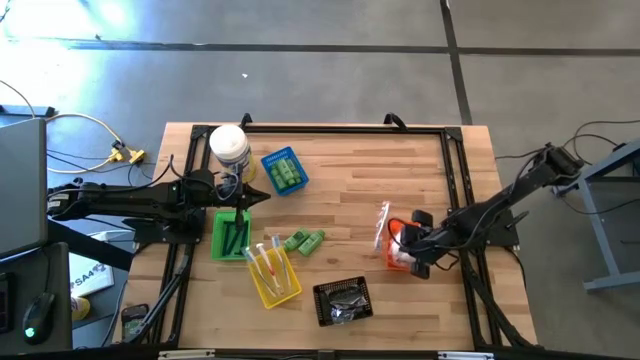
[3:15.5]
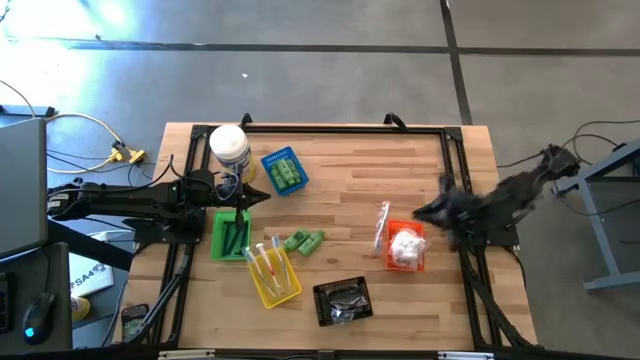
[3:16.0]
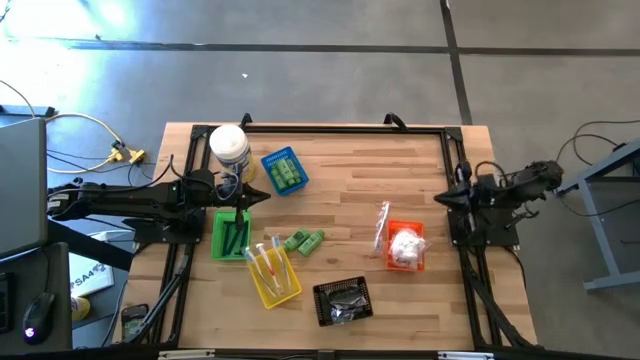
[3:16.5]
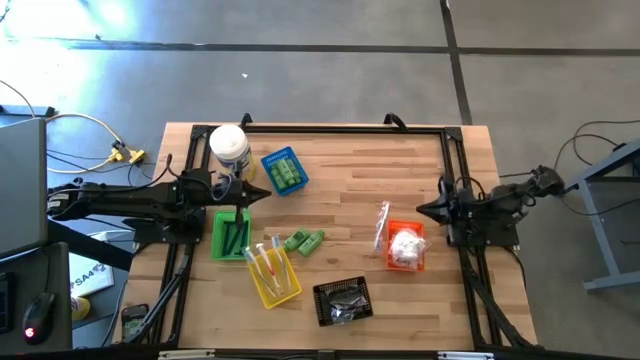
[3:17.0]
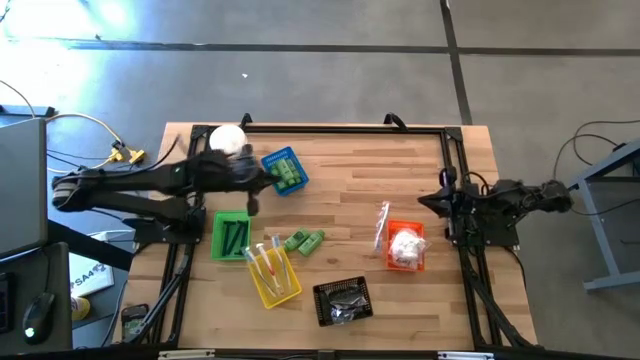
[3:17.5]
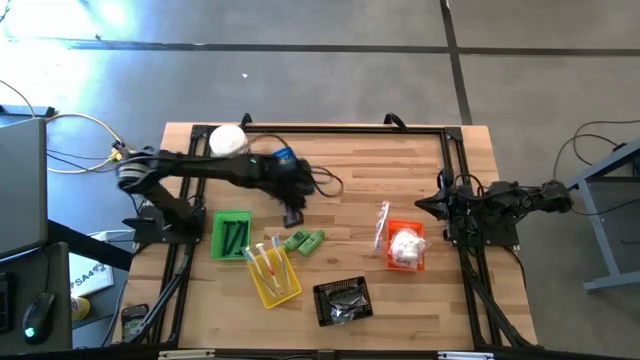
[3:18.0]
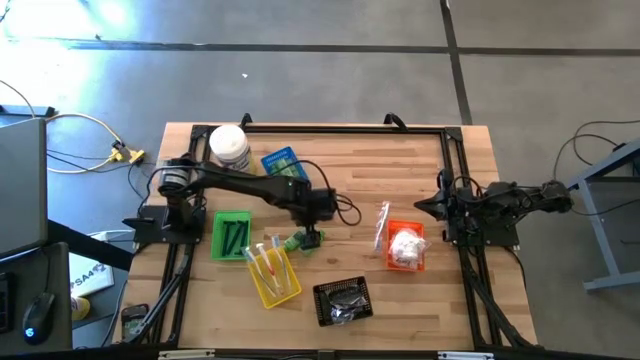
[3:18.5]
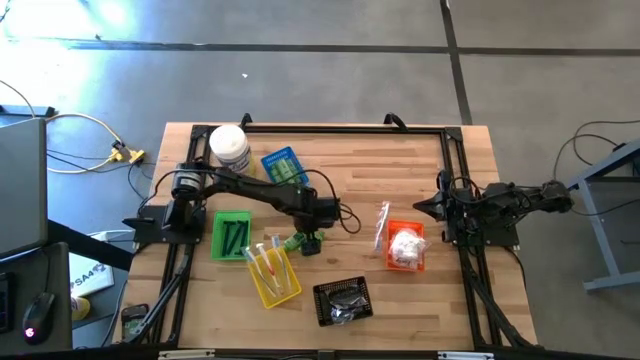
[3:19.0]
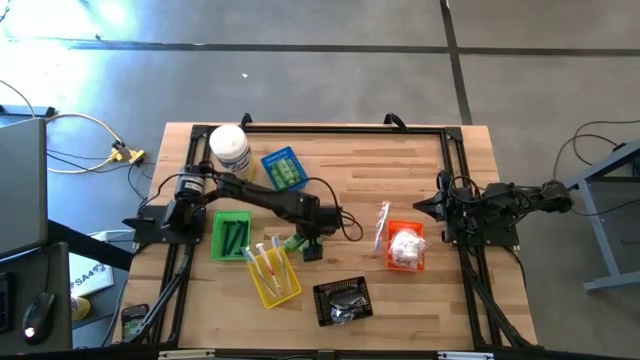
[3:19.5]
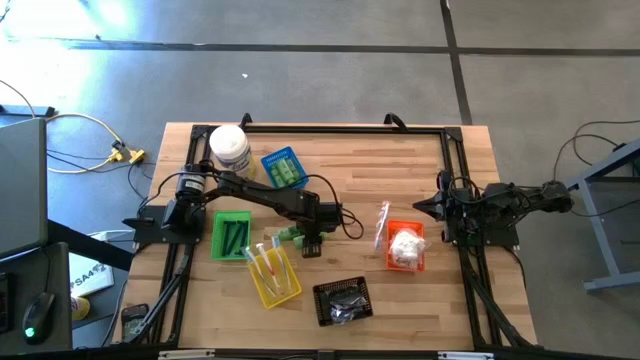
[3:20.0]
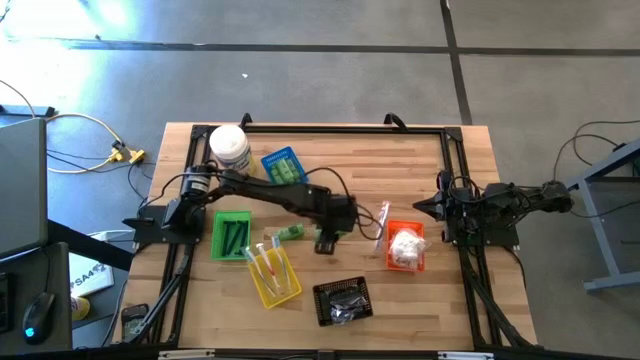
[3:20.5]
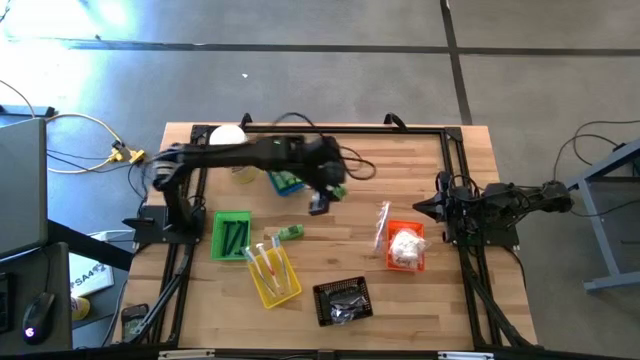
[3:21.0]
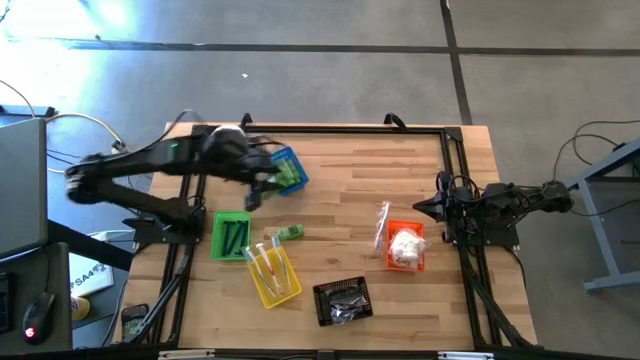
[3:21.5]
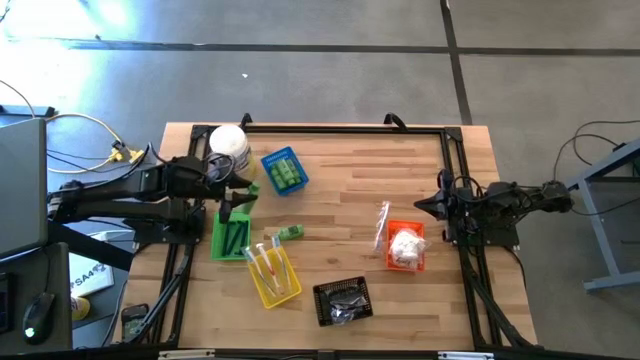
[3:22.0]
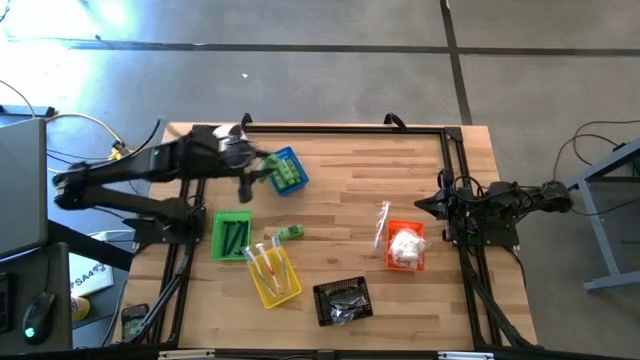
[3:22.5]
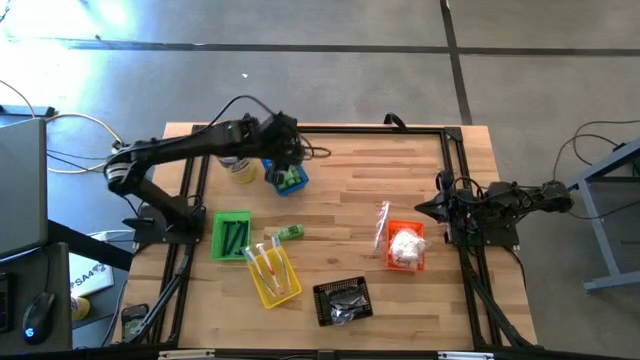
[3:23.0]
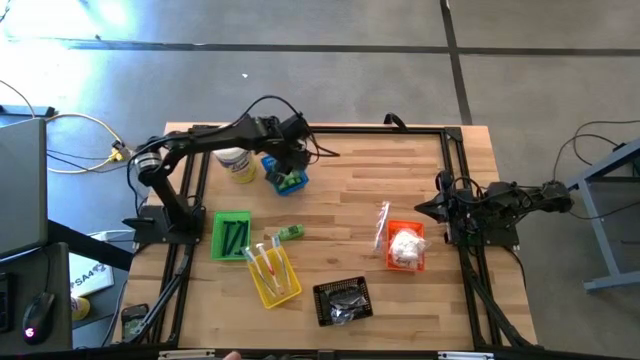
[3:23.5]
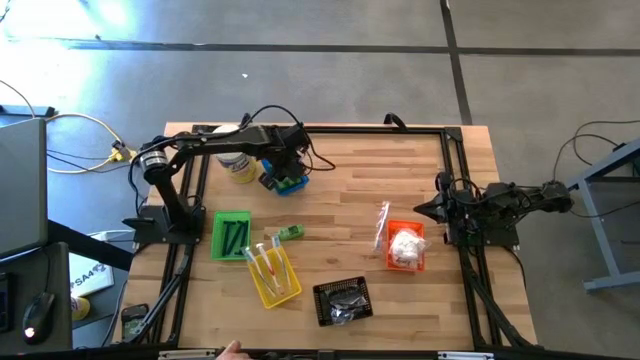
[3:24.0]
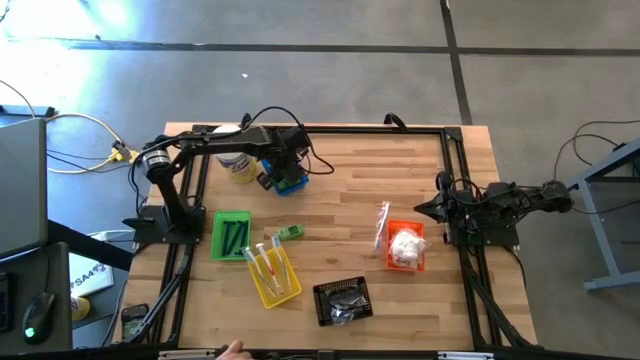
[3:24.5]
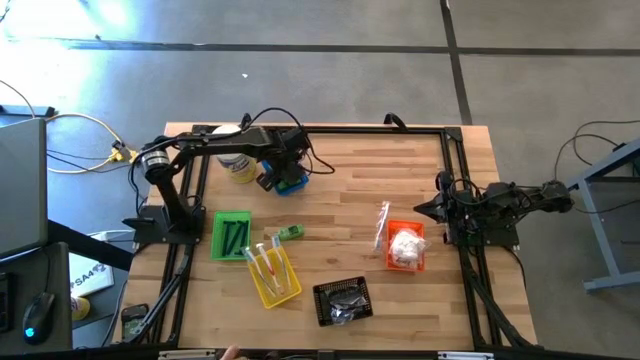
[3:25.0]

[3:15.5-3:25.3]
Task: Pick & Place Travel size toiletries
Put the green shampoo into the blue bin

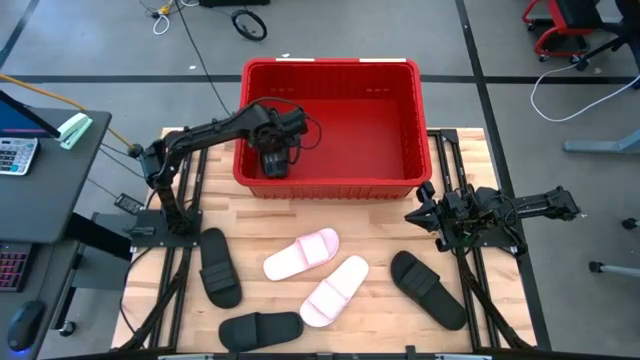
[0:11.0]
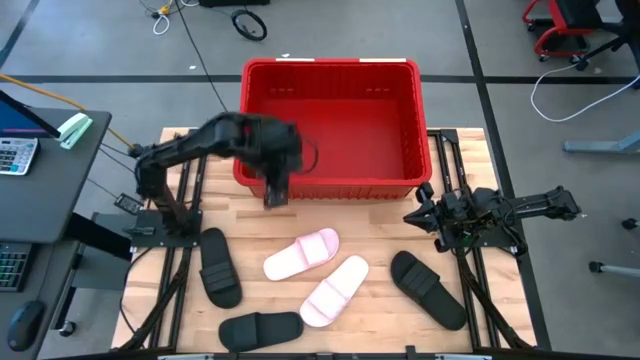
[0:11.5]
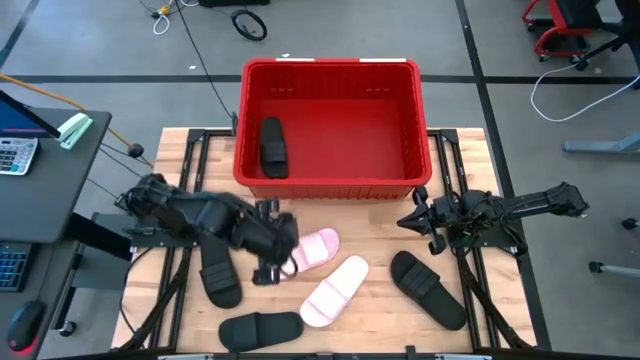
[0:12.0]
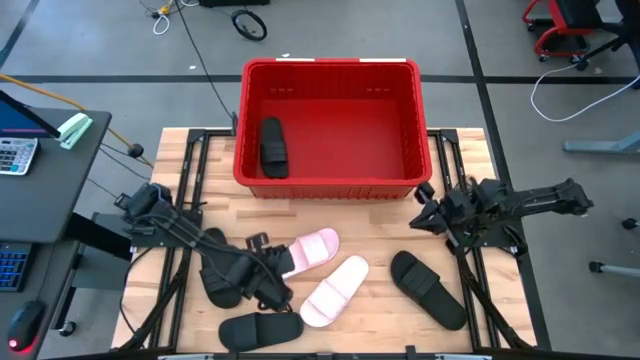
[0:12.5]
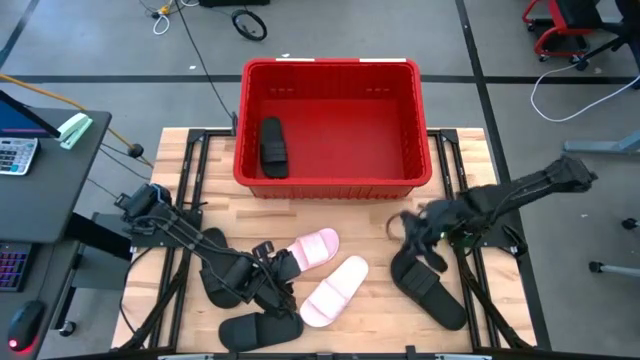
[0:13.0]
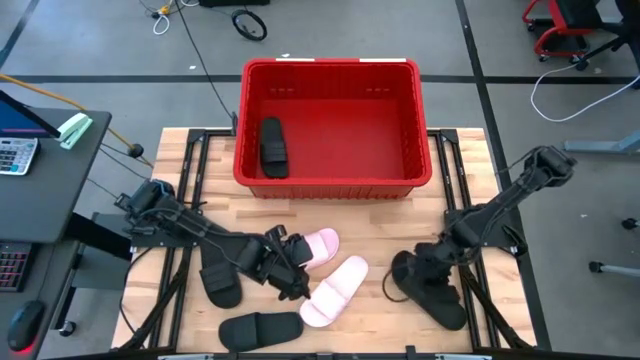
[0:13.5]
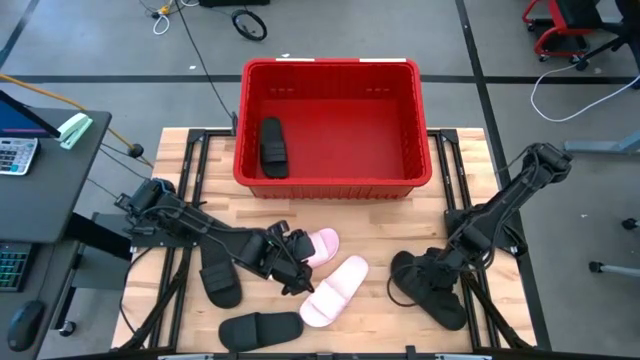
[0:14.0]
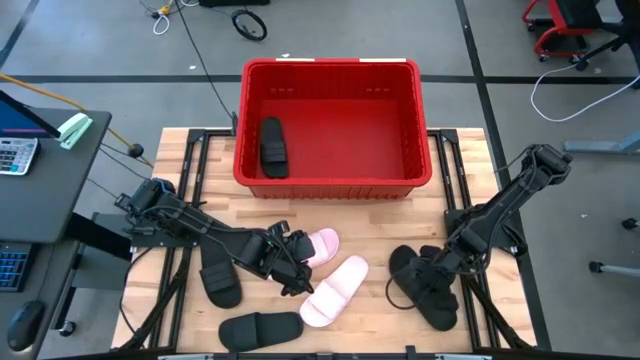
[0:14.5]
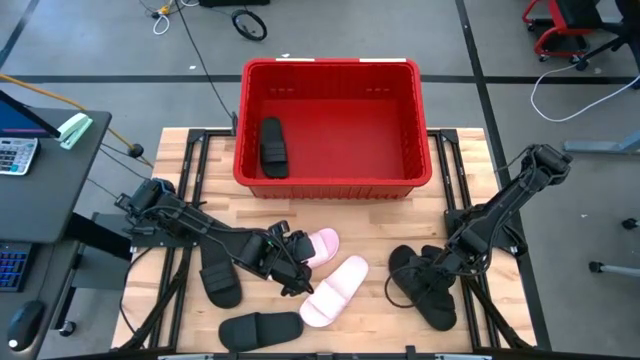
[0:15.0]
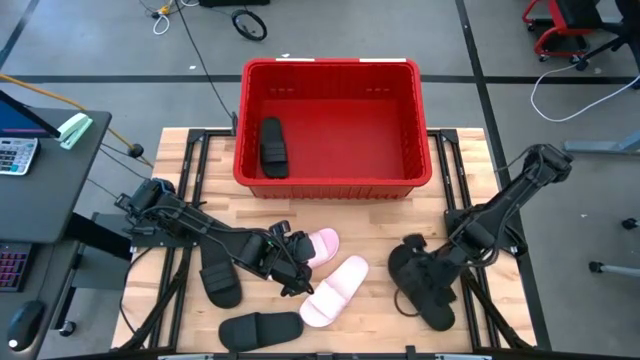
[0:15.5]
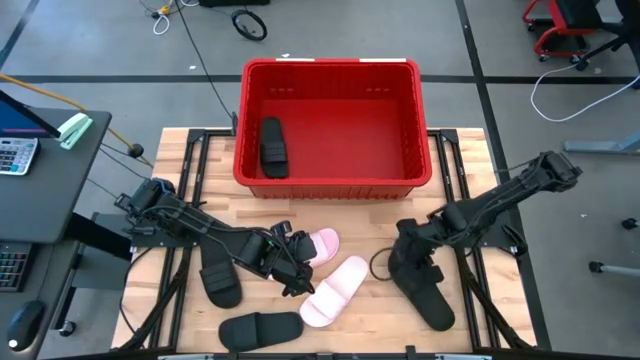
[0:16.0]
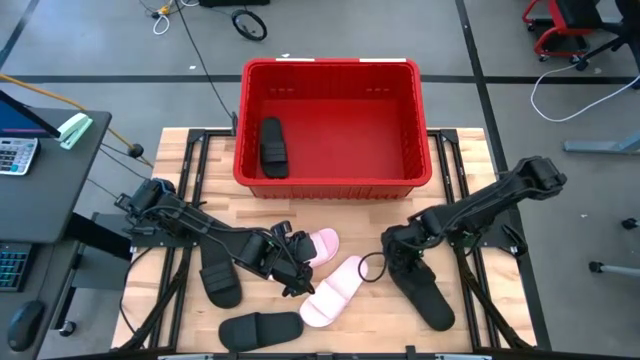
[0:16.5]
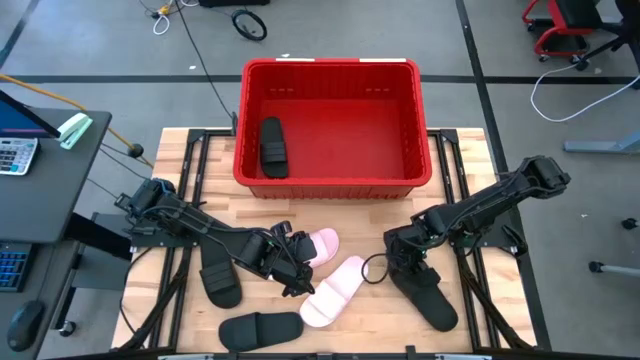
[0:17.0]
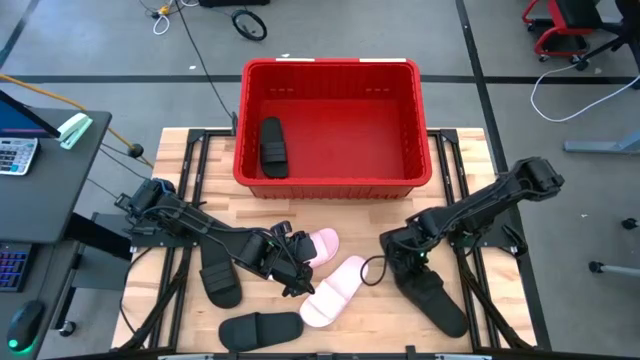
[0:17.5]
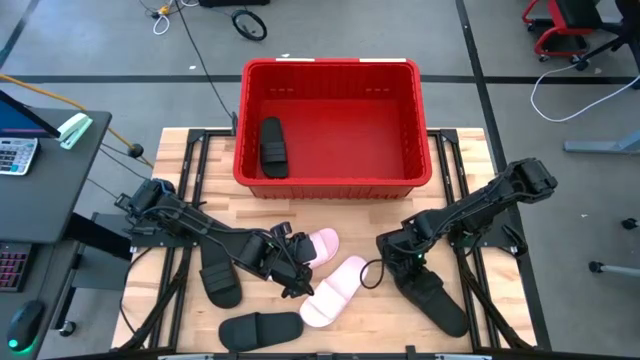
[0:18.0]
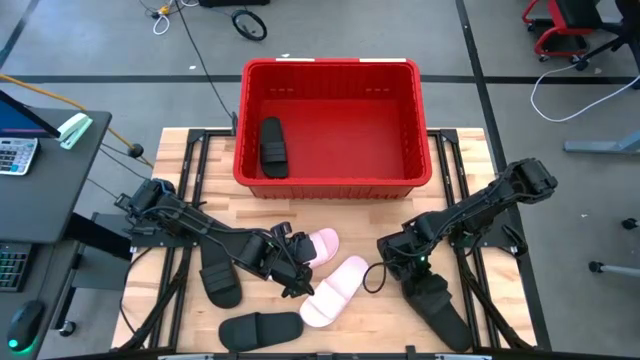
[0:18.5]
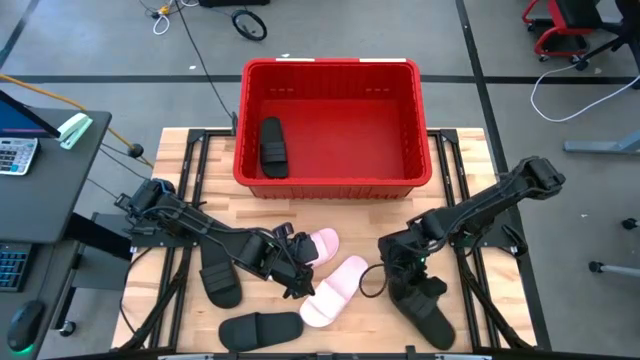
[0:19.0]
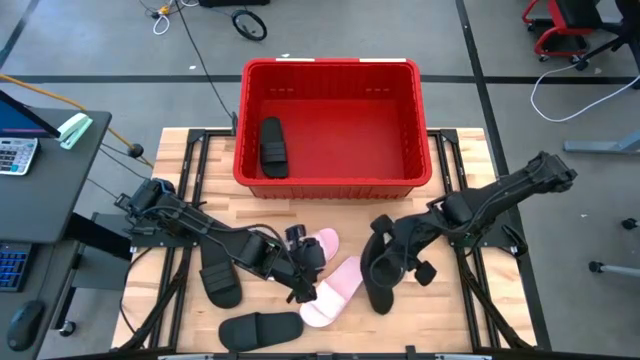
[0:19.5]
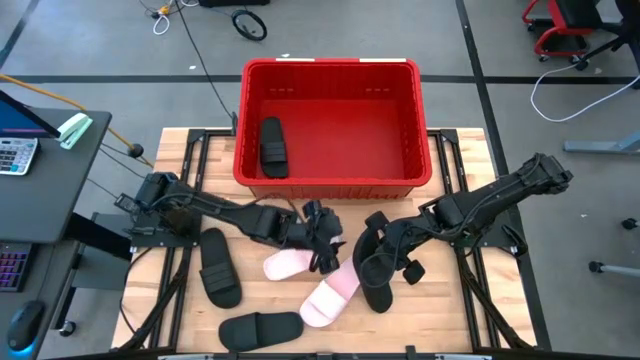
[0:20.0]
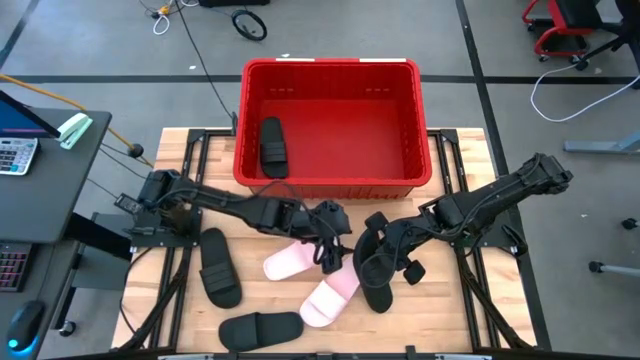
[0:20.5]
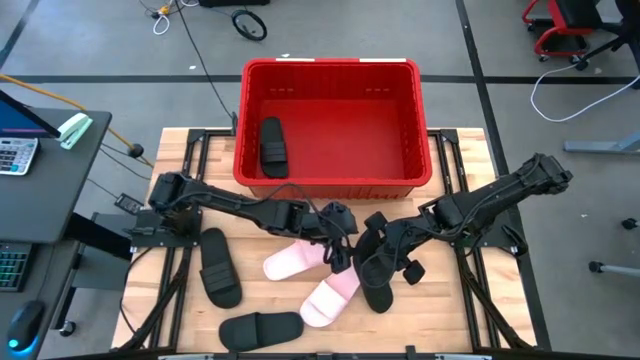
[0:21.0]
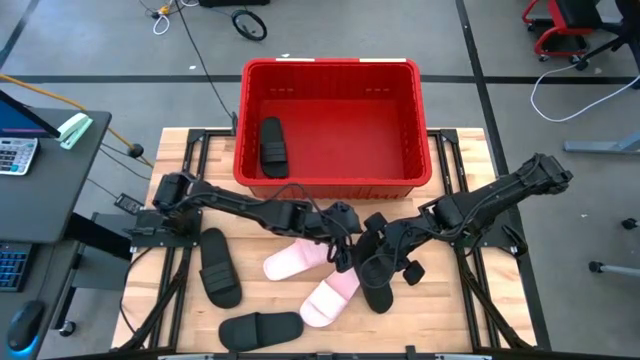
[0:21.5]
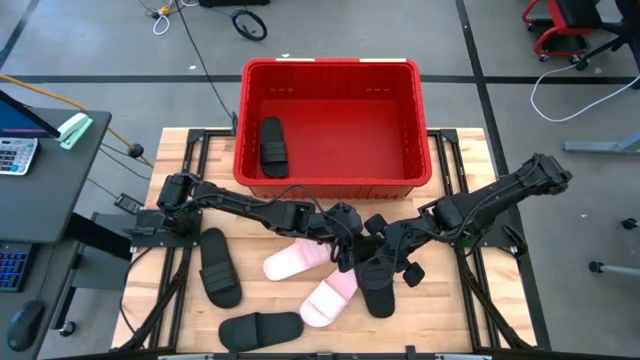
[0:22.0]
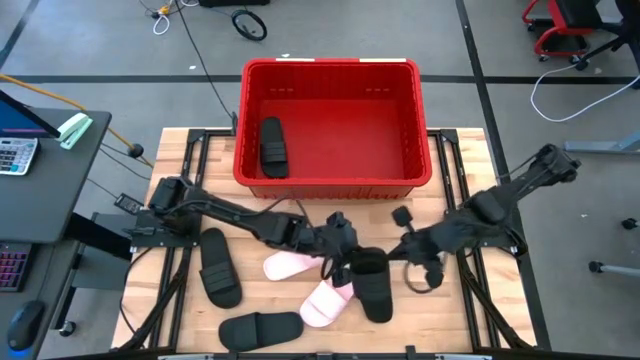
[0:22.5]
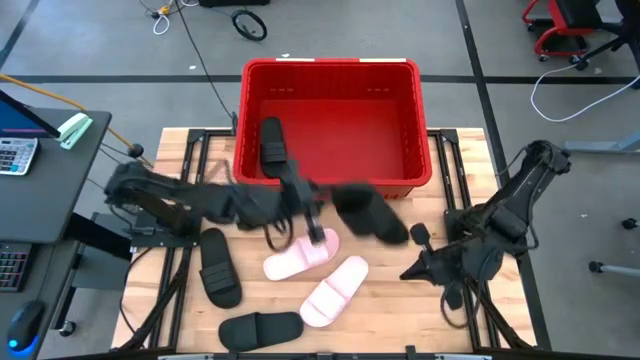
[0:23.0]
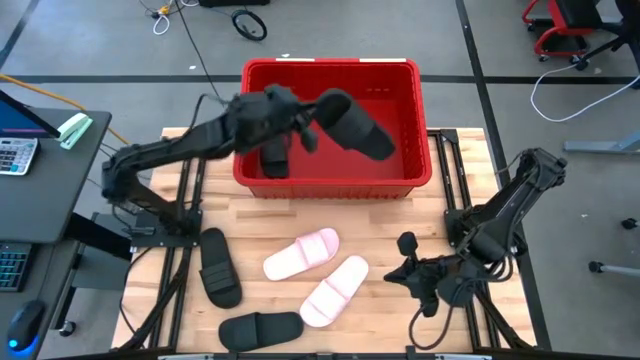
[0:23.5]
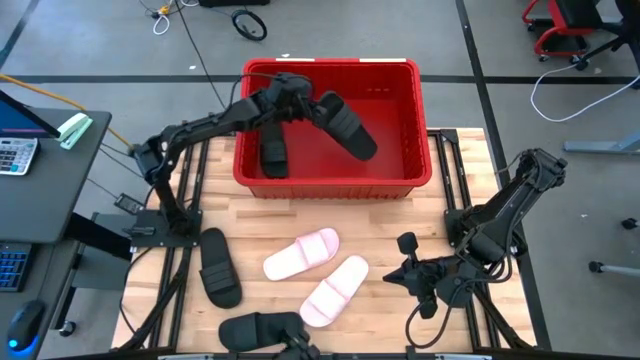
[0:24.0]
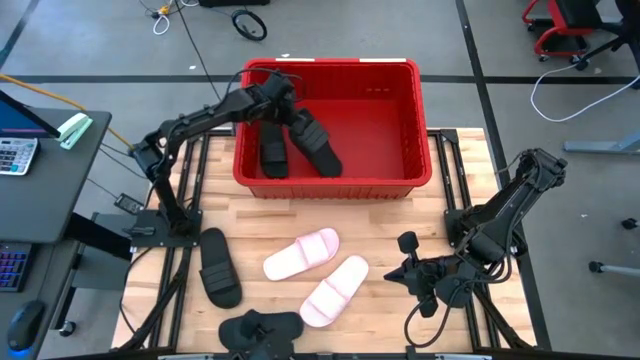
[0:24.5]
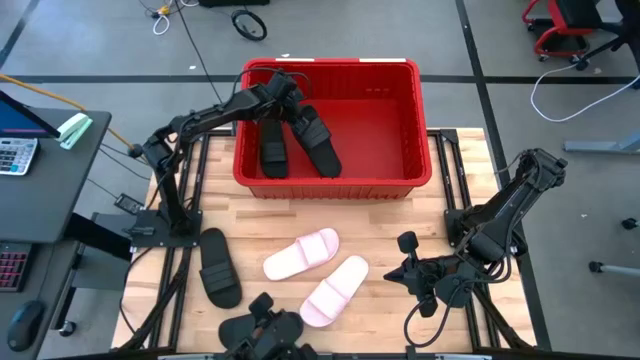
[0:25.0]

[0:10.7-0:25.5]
Task: Pick and place slides into bin
Put the bottom right black slide into the red bin
